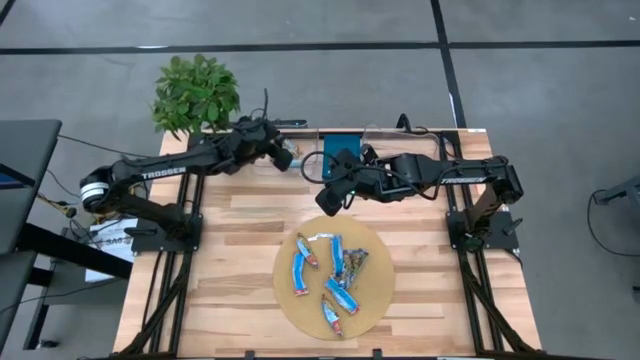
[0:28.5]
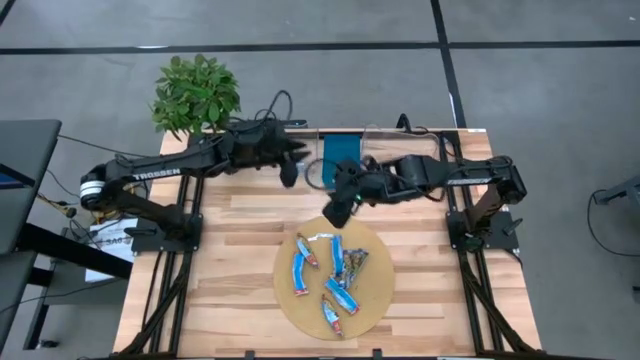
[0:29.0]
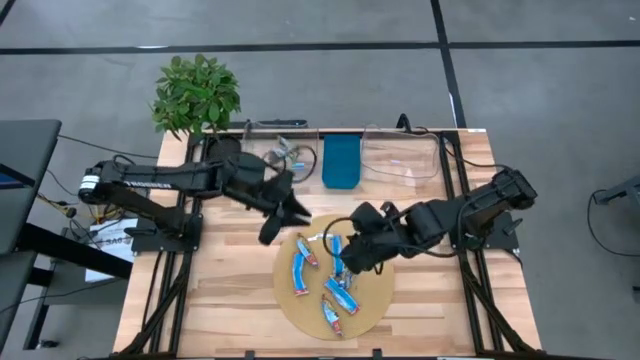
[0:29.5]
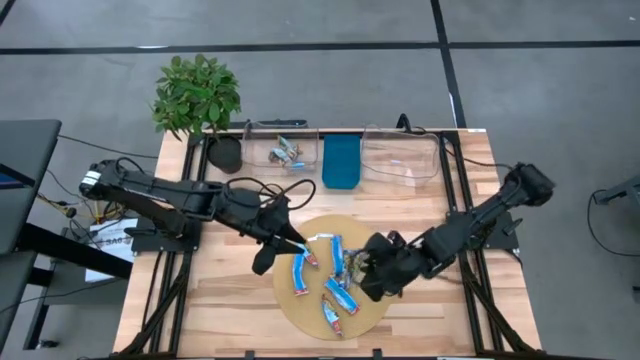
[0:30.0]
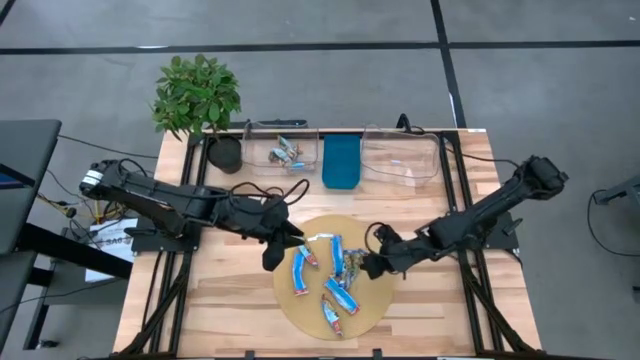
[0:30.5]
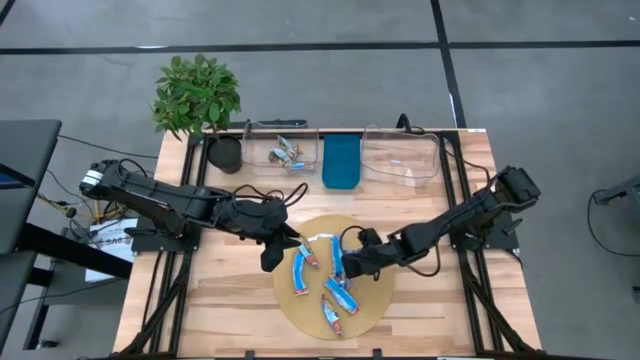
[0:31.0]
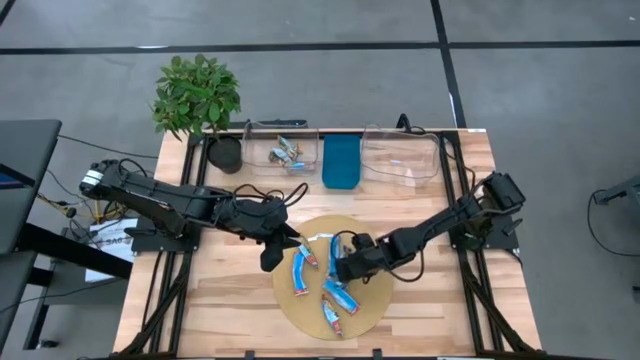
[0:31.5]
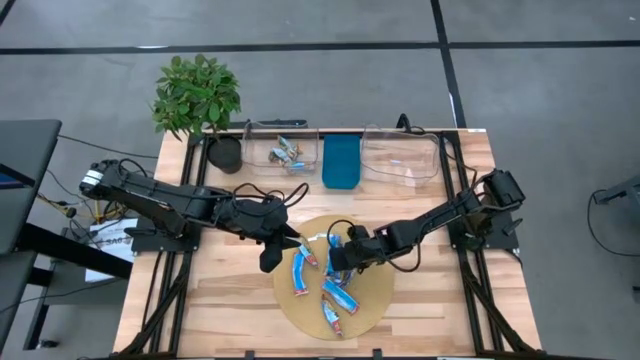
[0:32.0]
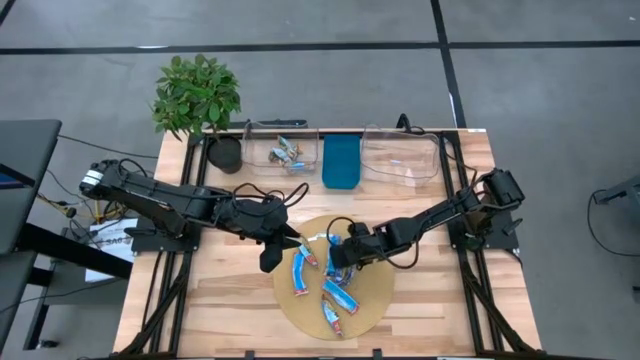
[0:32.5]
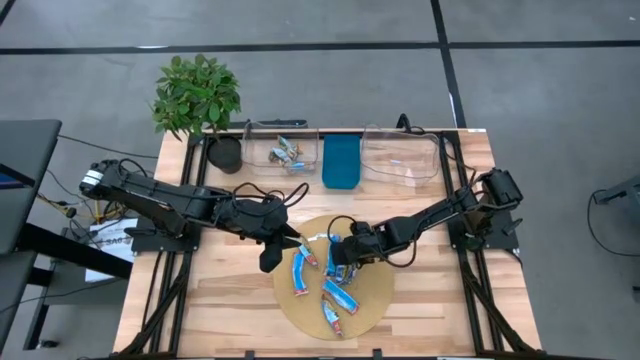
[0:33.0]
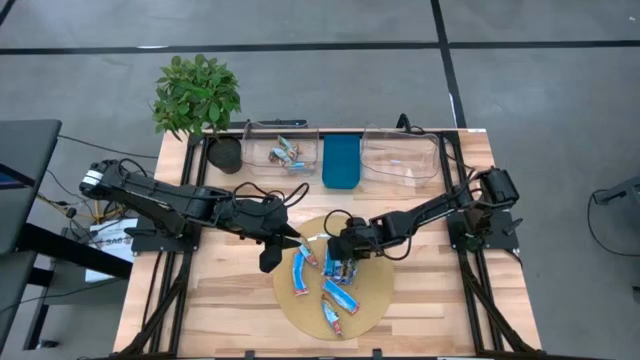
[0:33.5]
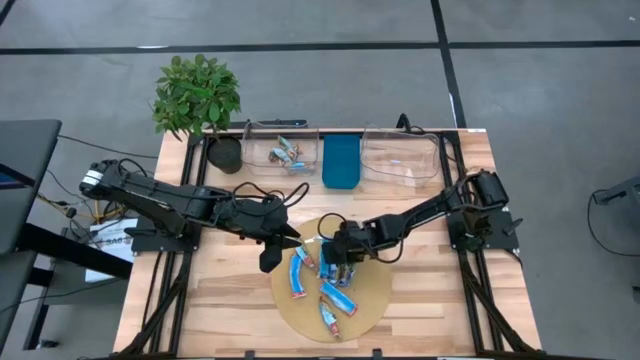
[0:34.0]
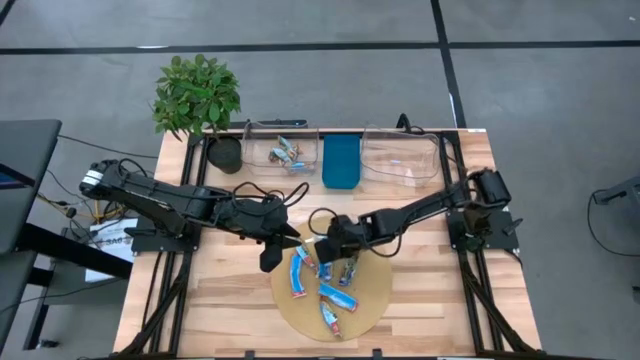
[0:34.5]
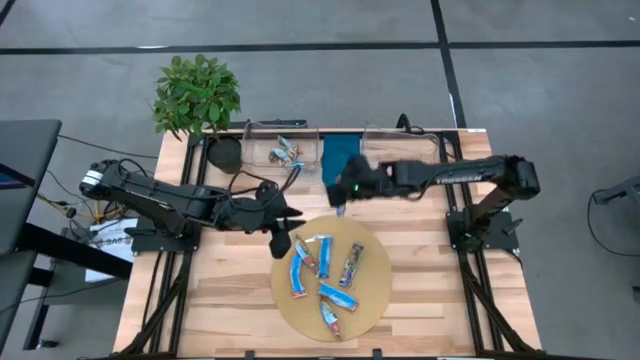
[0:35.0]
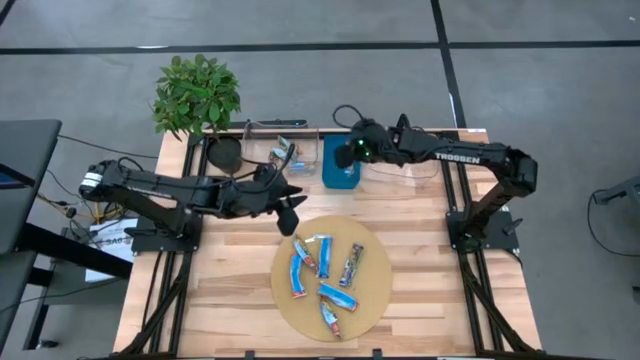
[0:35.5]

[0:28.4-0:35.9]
Task: Pick and place Granola Bars by type
Put the blue granola bar into the blue bin

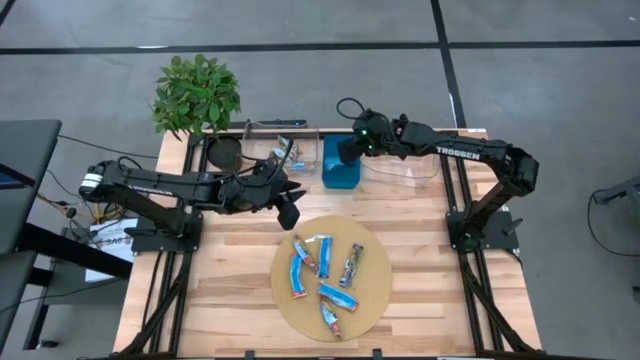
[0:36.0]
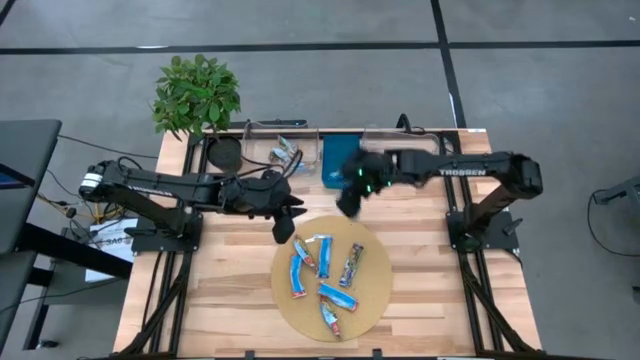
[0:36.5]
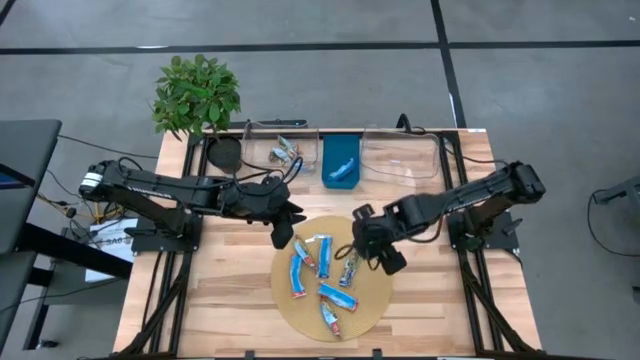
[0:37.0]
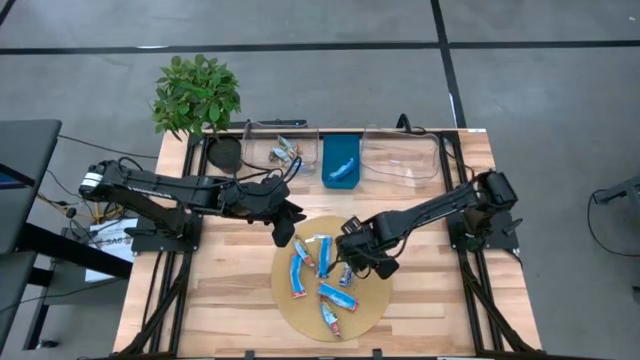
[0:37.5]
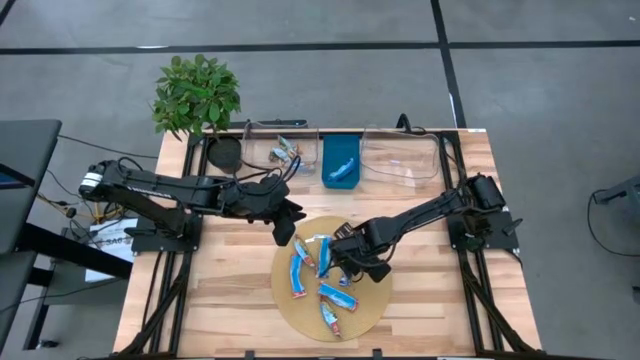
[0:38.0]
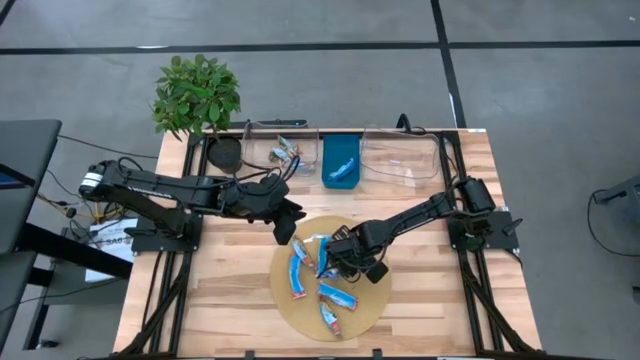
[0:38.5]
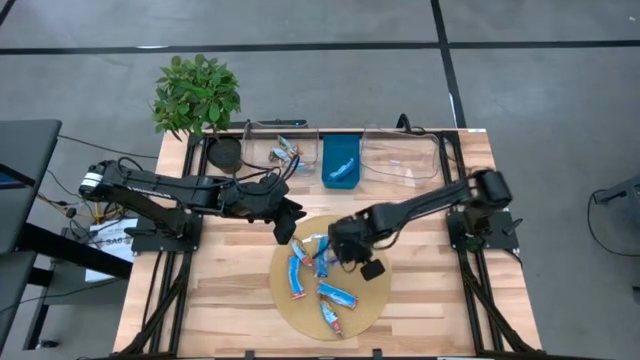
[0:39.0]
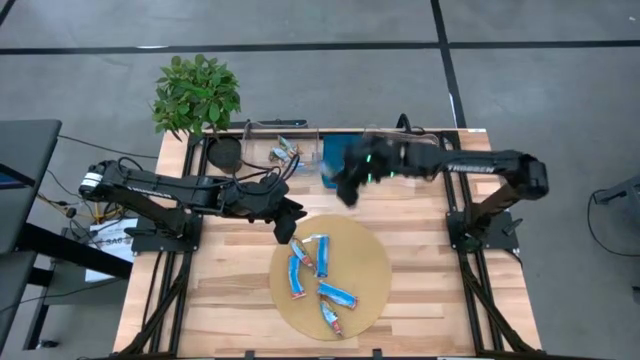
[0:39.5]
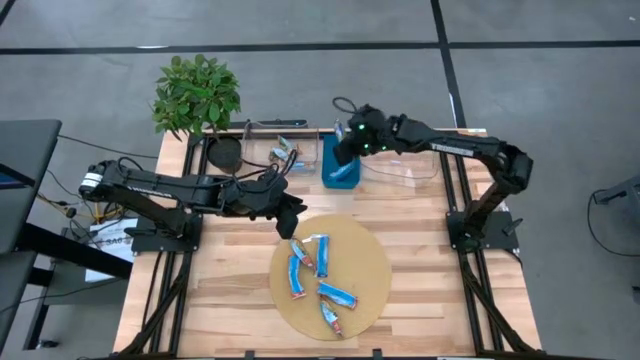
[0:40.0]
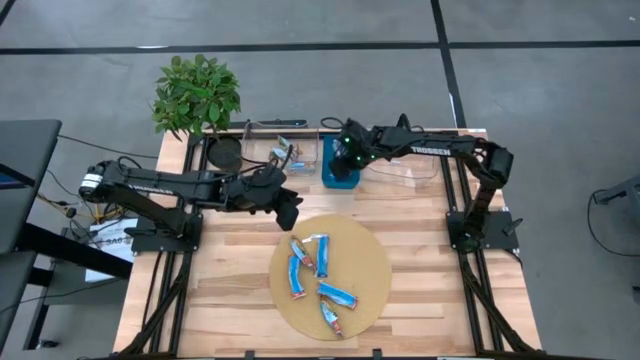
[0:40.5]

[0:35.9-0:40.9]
Put the blue granola bar into the blue bin

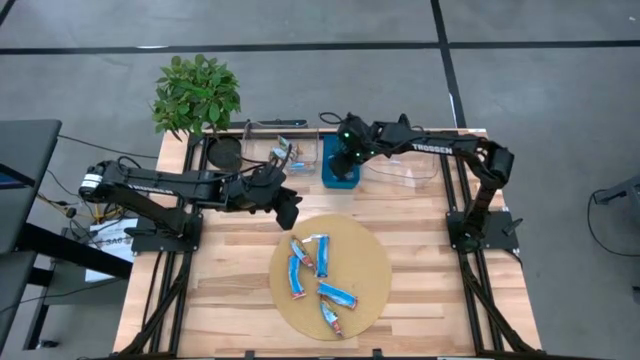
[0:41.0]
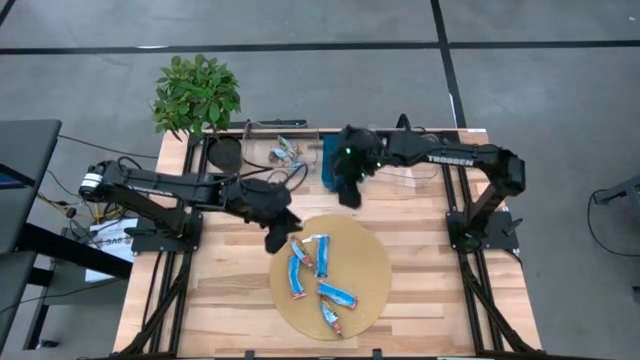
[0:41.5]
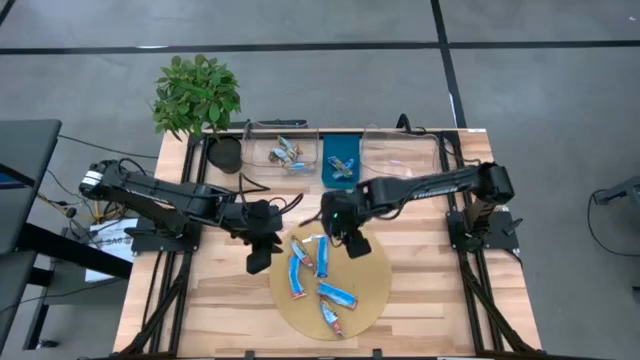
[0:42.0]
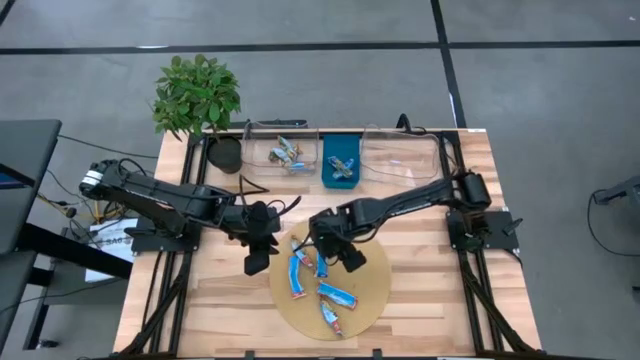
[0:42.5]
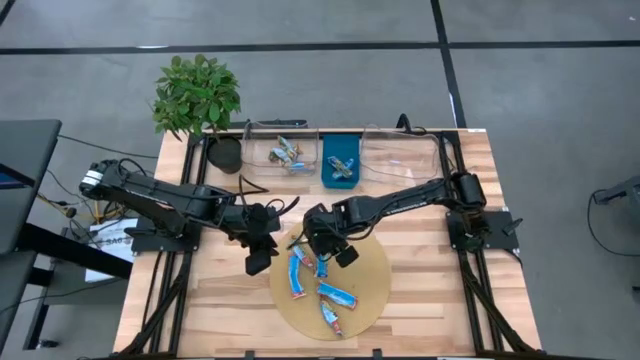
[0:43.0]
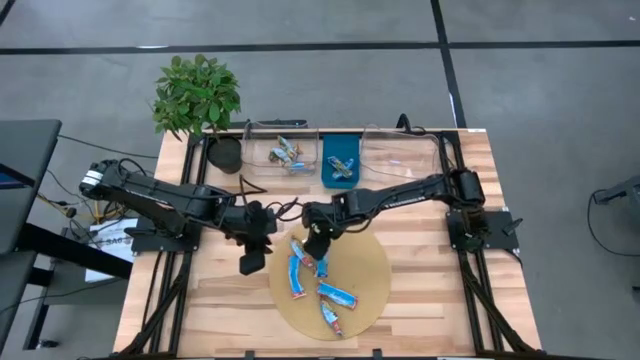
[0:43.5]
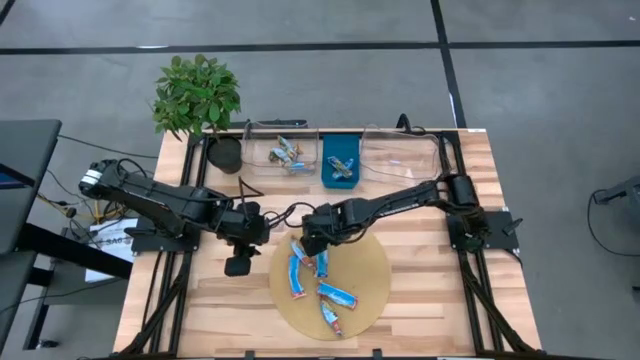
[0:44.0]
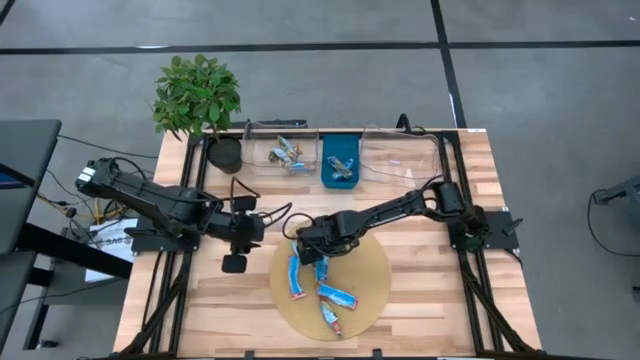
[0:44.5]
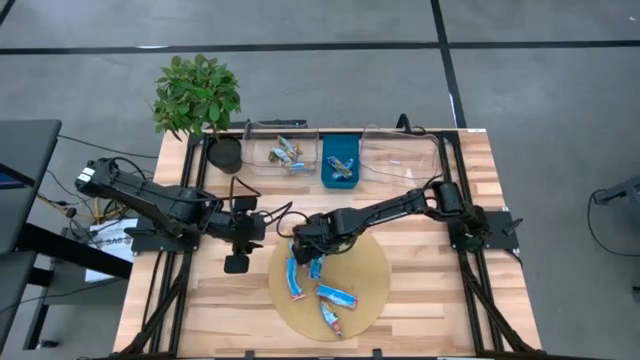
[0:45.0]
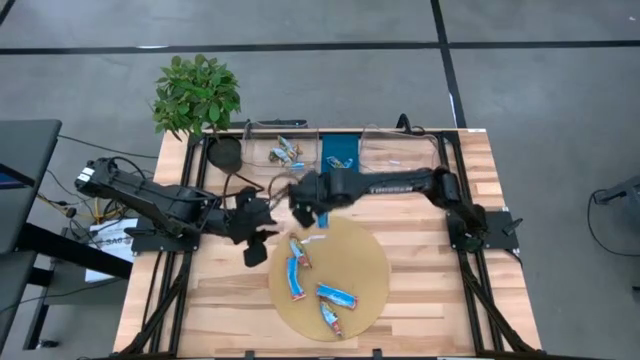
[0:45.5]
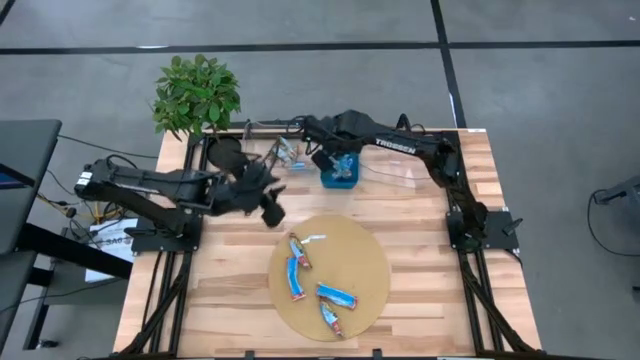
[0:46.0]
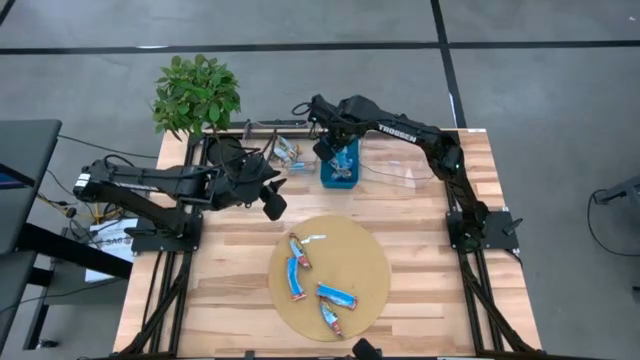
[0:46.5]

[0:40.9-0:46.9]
Put the blue granola bar into the blue bin

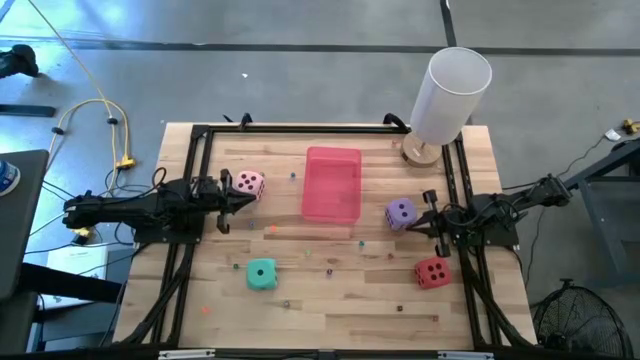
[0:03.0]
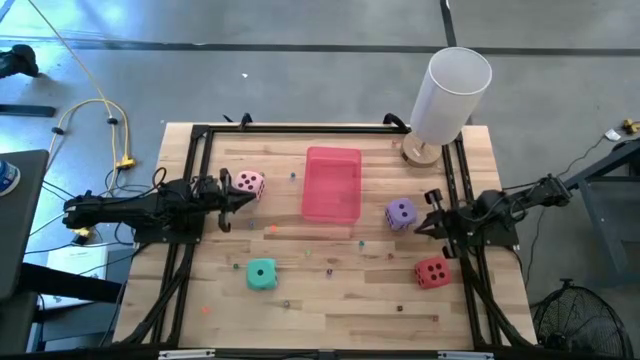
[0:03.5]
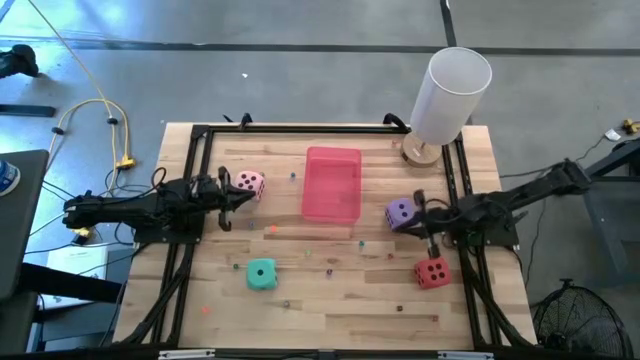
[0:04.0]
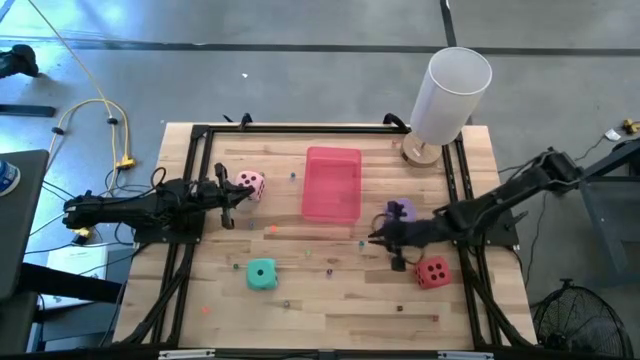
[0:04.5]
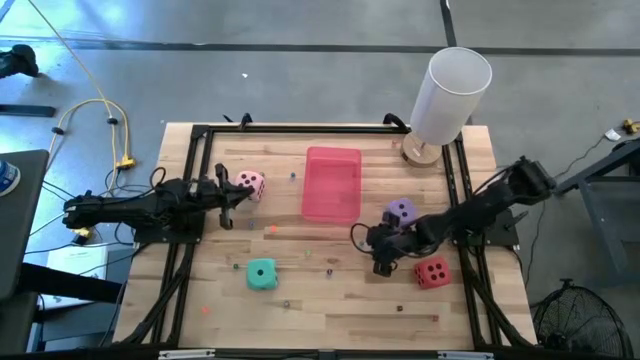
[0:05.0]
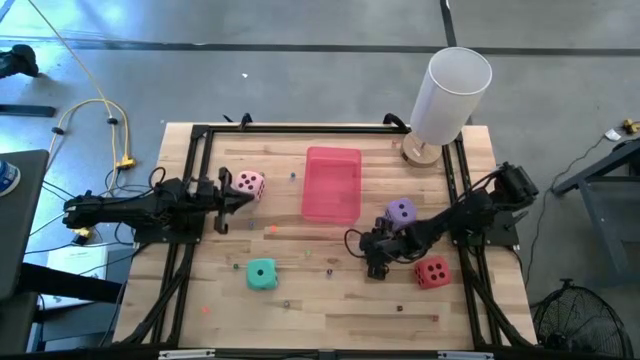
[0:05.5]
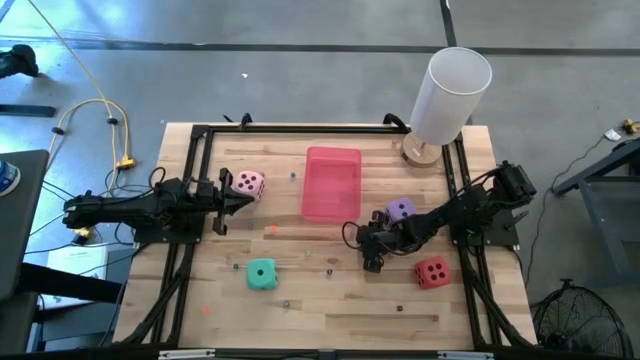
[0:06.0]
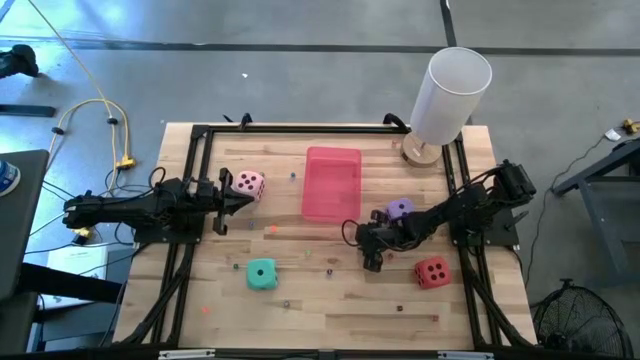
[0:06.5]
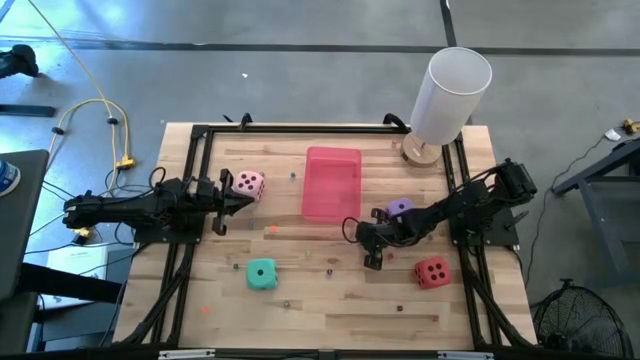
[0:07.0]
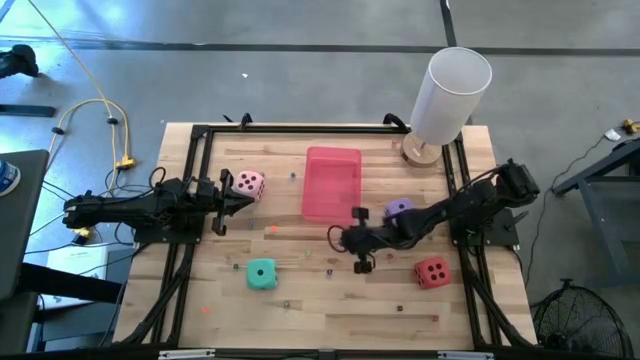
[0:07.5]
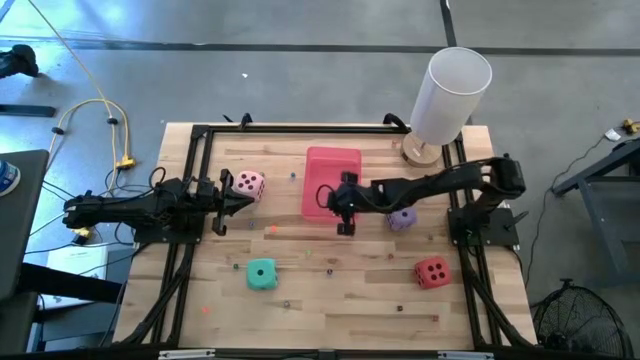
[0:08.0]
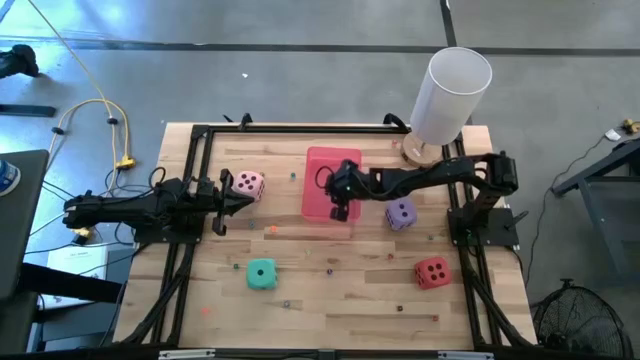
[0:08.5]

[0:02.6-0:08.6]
Task: Pick & Place Dice
Put the small light blue die into the red bin
